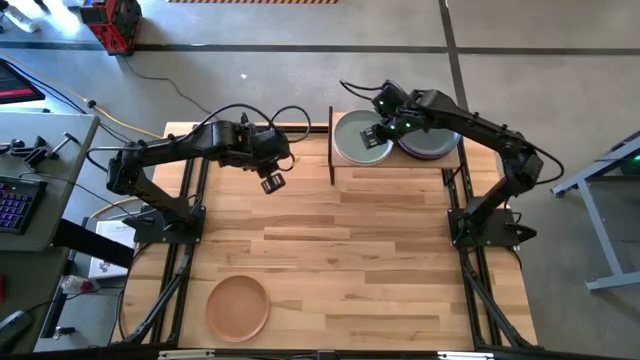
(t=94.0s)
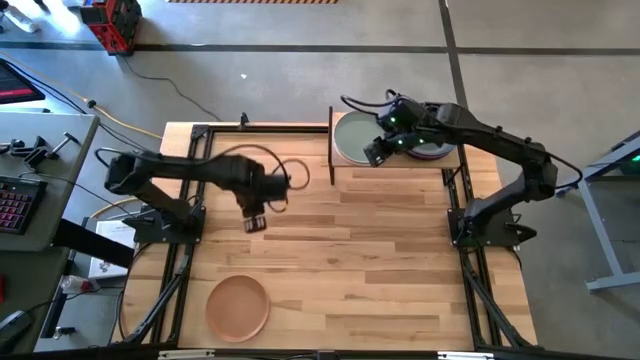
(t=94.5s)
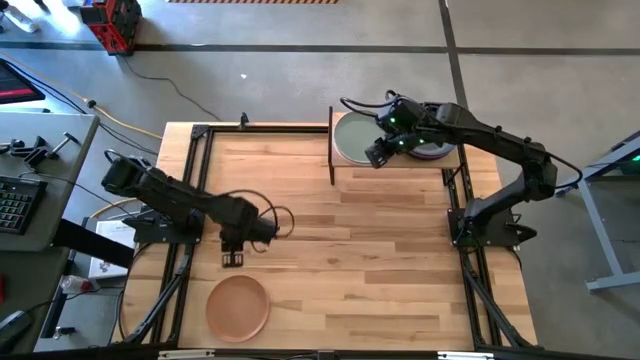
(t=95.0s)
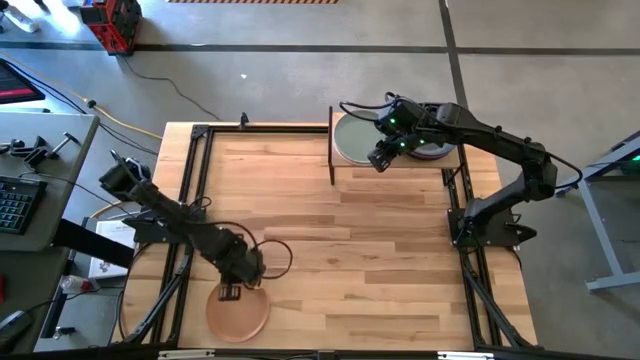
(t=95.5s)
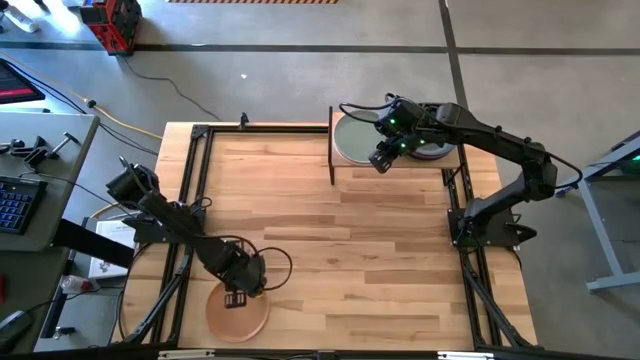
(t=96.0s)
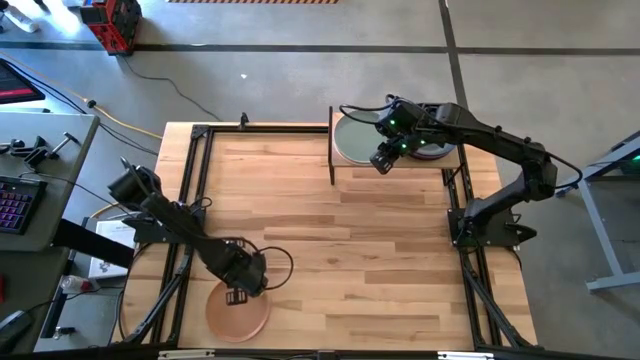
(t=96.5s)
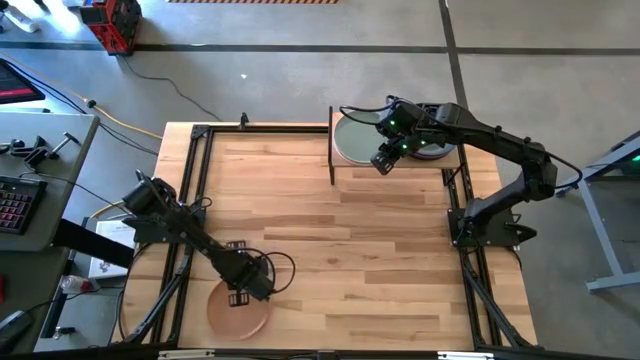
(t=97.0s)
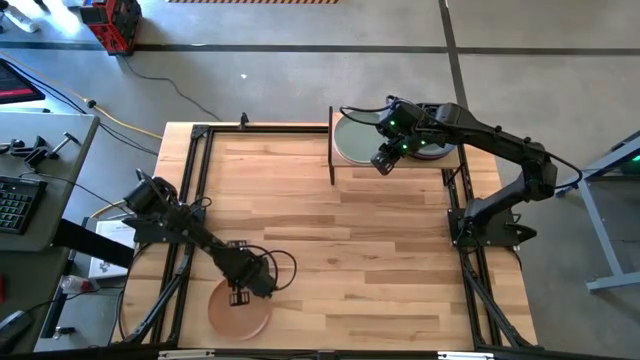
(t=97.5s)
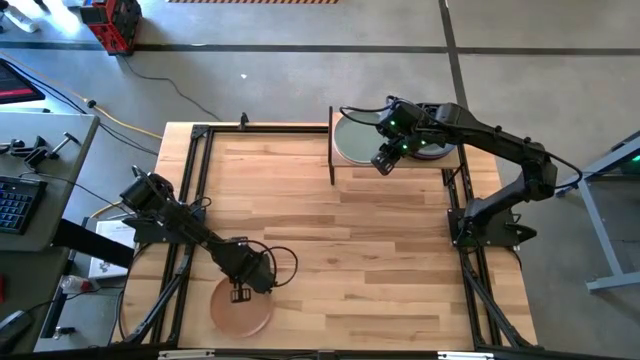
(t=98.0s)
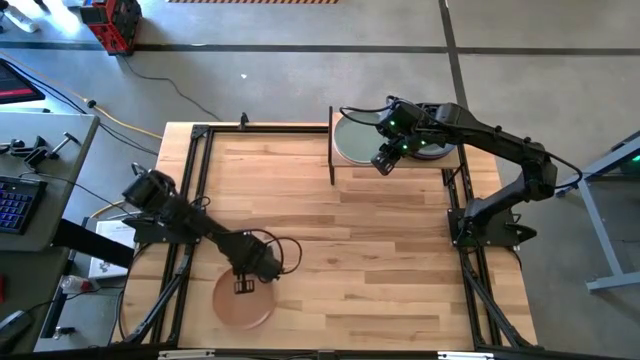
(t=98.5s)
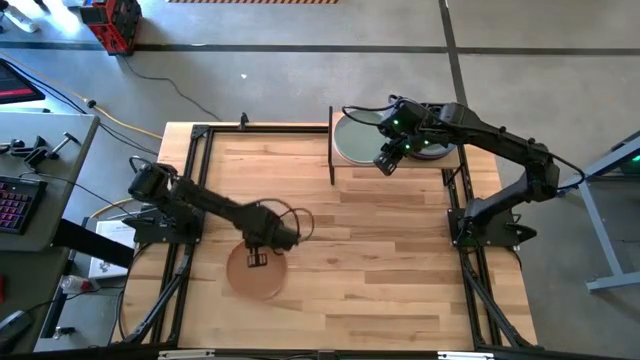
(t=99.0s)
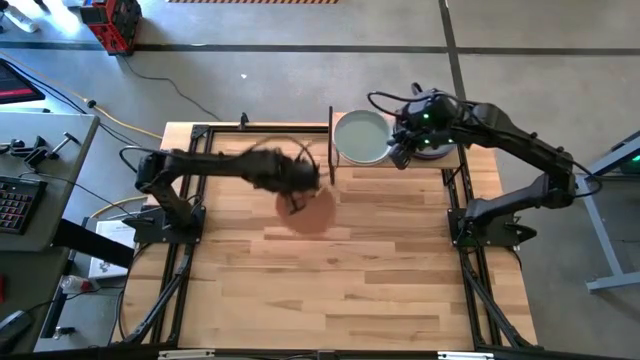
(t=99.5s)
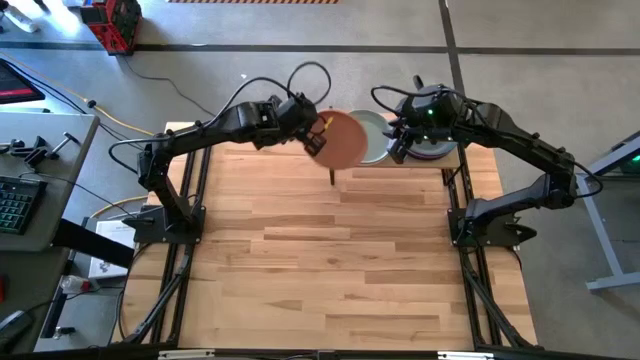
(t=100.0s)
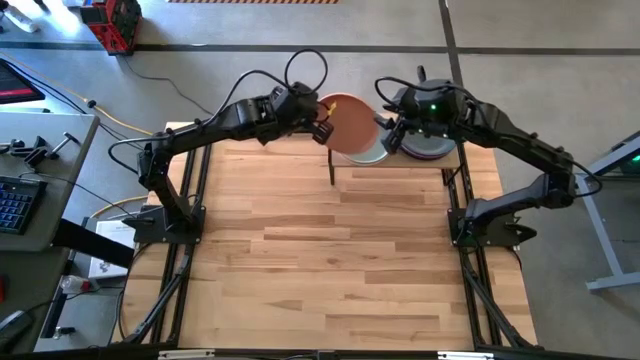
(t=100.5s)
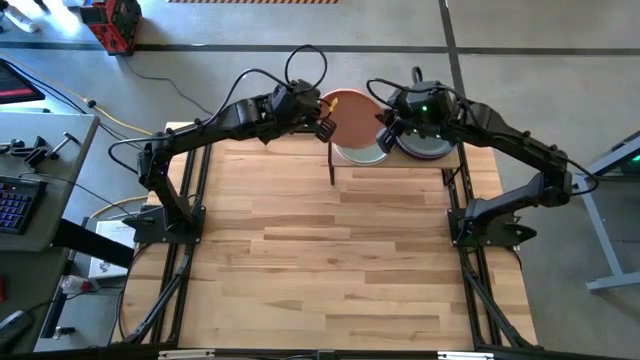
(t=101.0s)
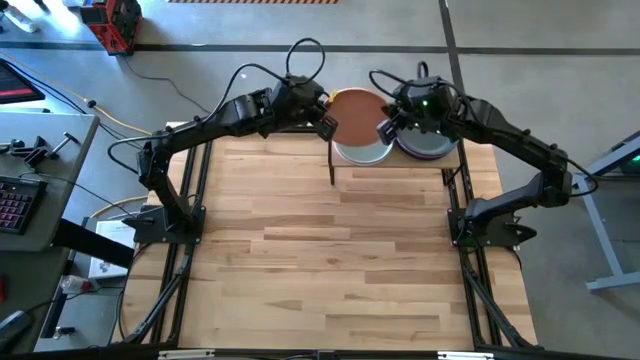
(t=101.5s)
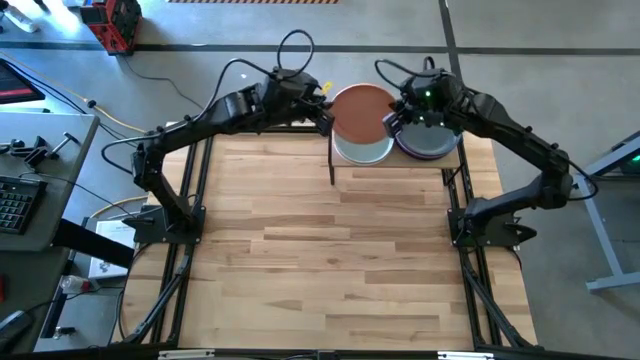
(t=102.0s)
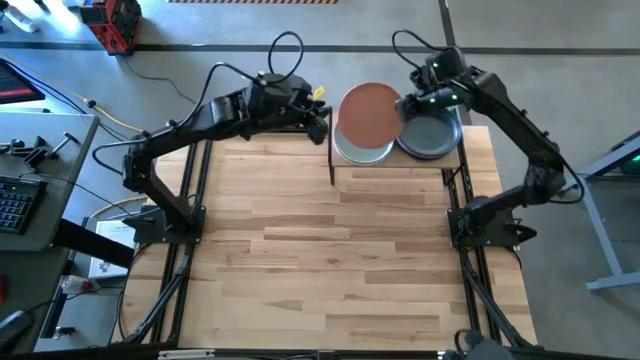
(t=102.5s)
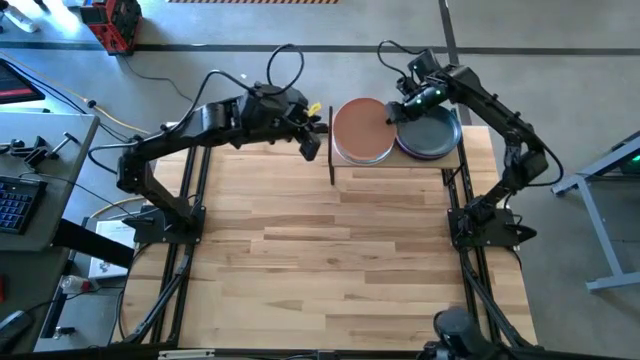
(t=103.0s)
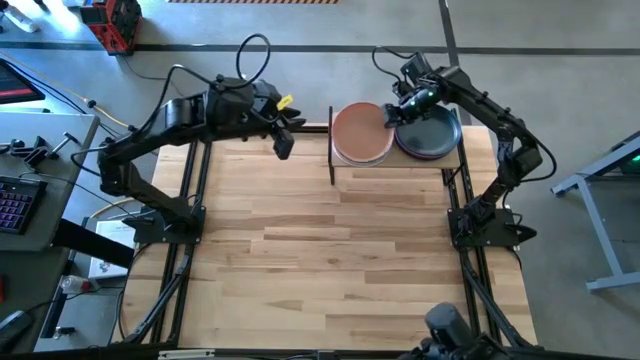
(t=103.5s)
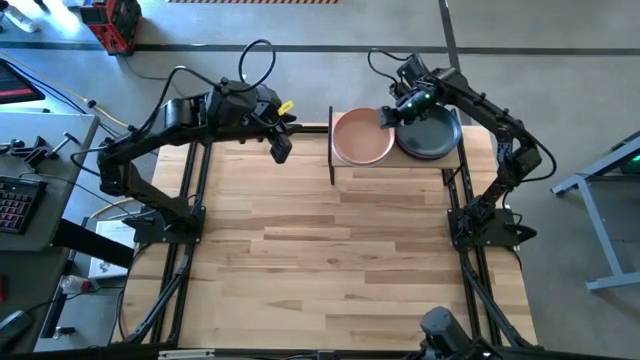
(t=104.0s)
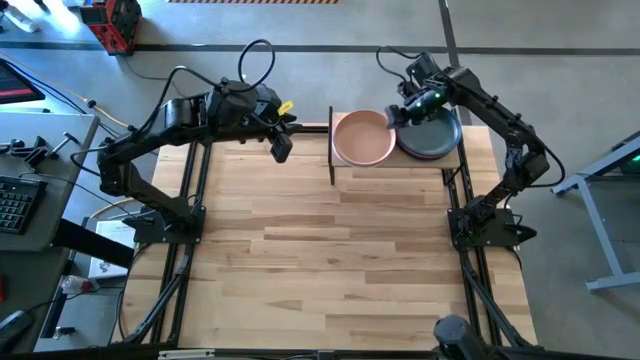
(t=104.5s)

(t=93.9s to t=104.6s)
Task: Place and stack plates onto a shelf
Stack the brown plate on top of the blue plate on the shelf

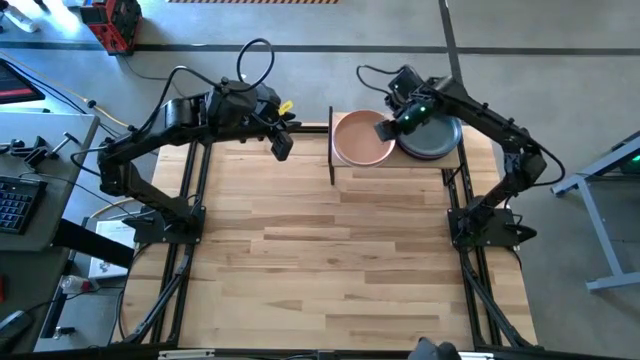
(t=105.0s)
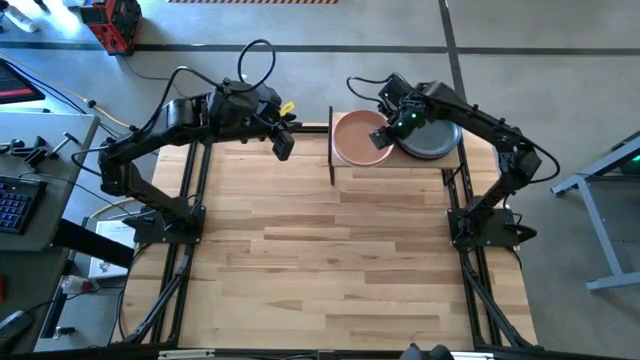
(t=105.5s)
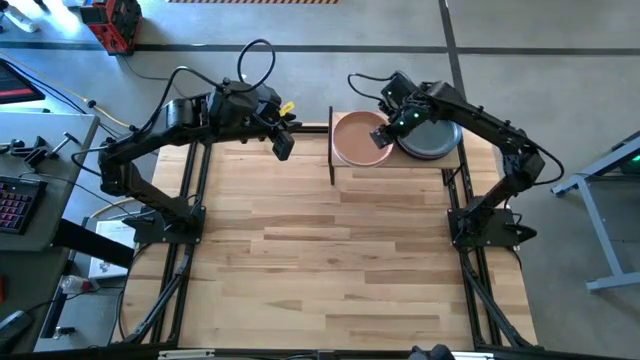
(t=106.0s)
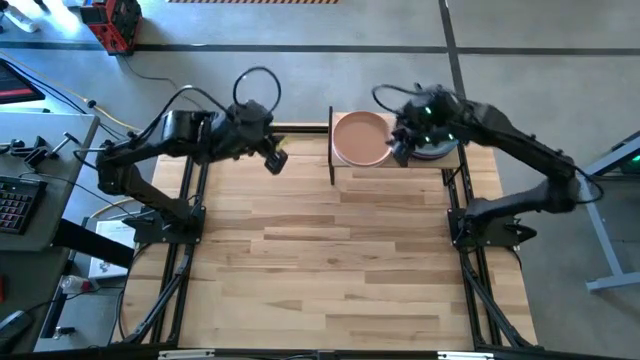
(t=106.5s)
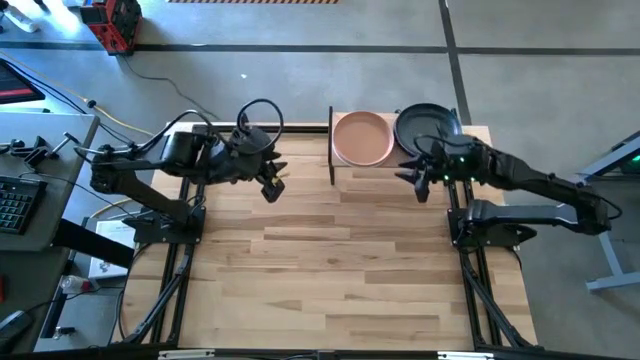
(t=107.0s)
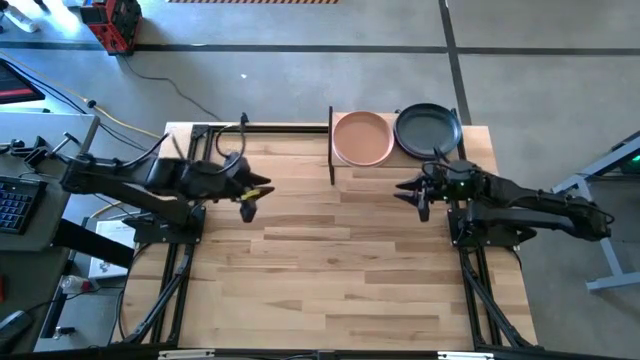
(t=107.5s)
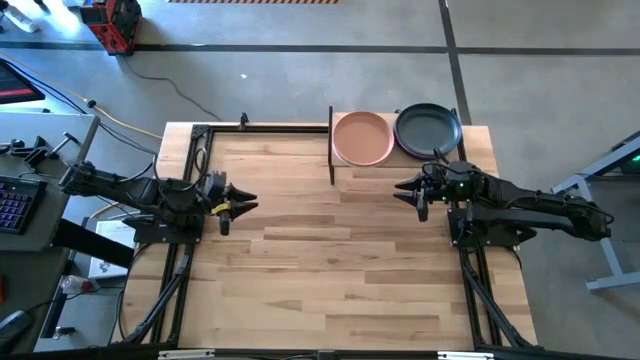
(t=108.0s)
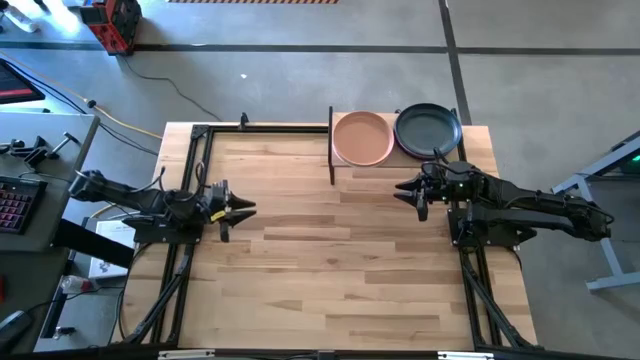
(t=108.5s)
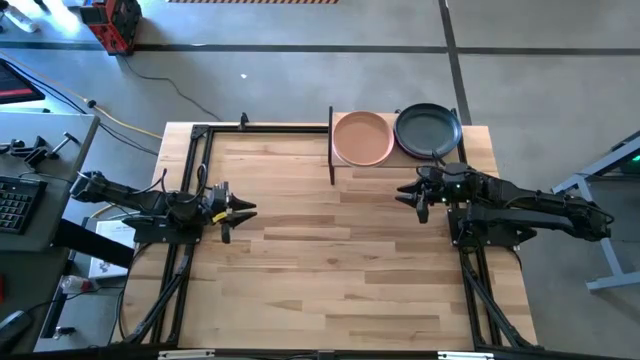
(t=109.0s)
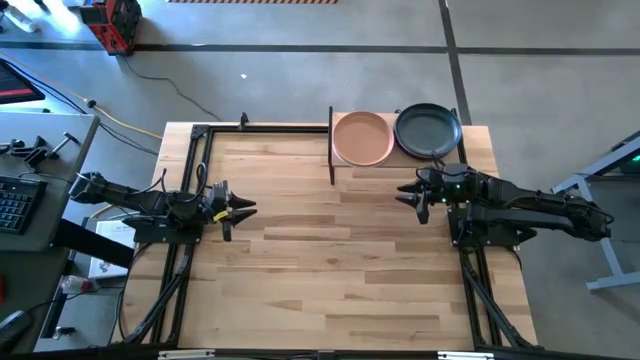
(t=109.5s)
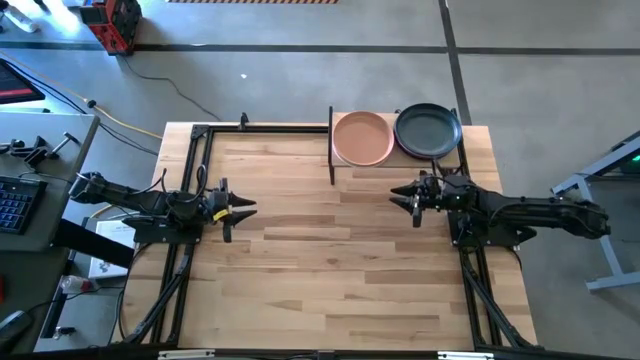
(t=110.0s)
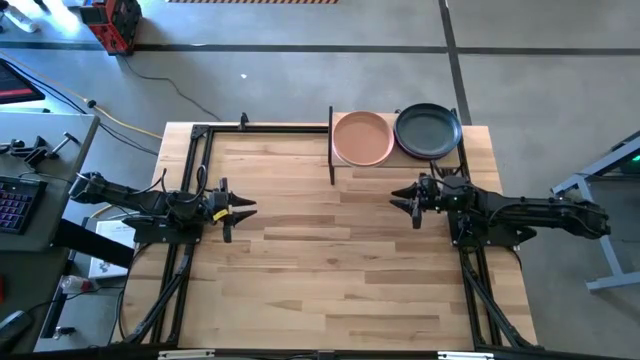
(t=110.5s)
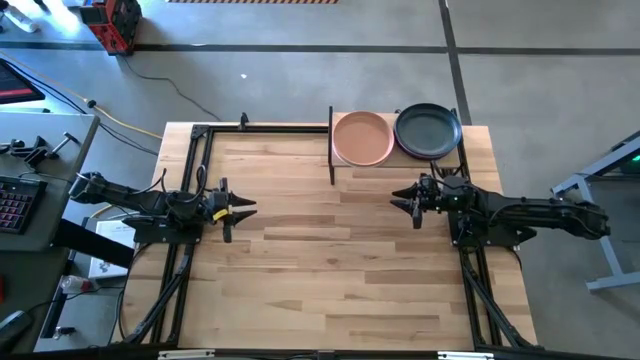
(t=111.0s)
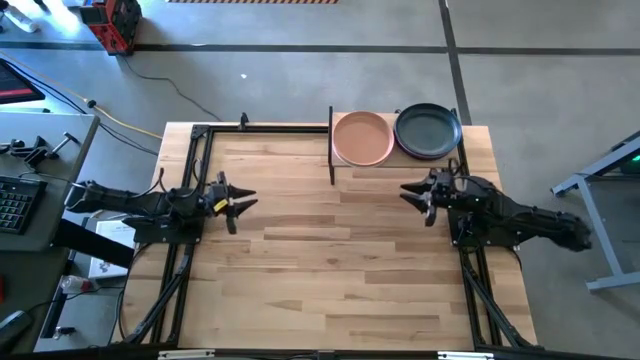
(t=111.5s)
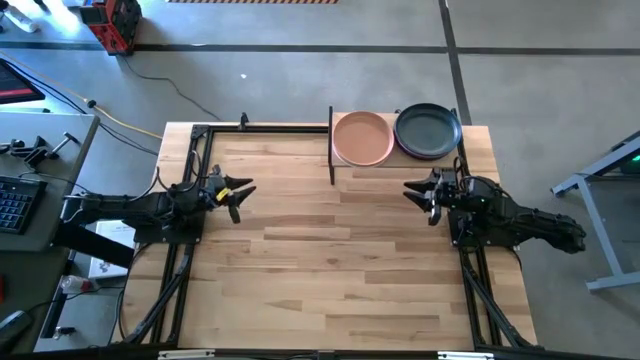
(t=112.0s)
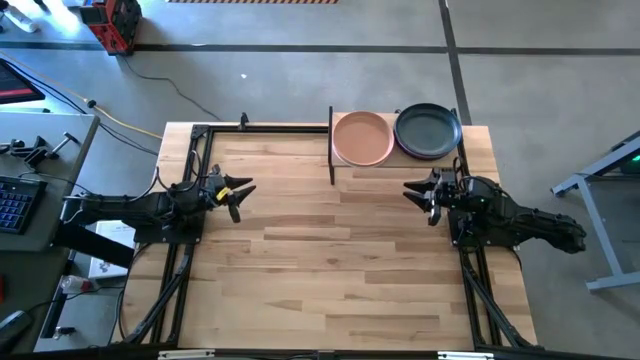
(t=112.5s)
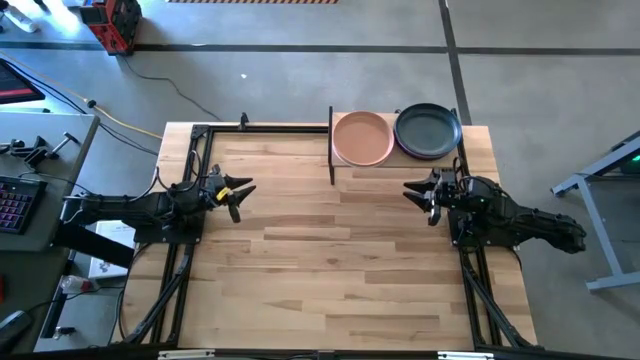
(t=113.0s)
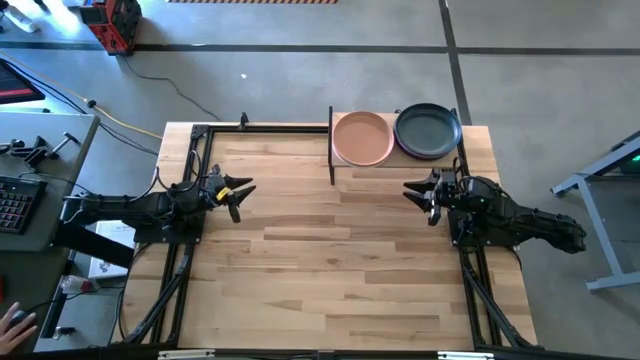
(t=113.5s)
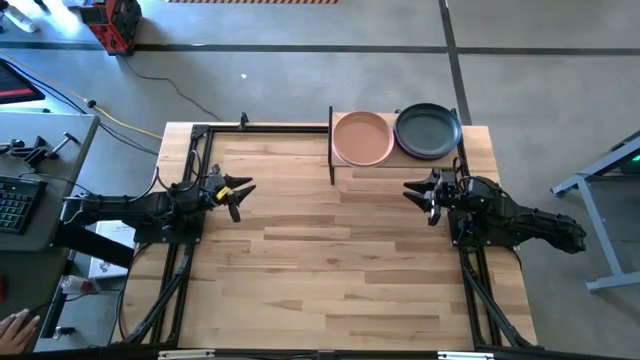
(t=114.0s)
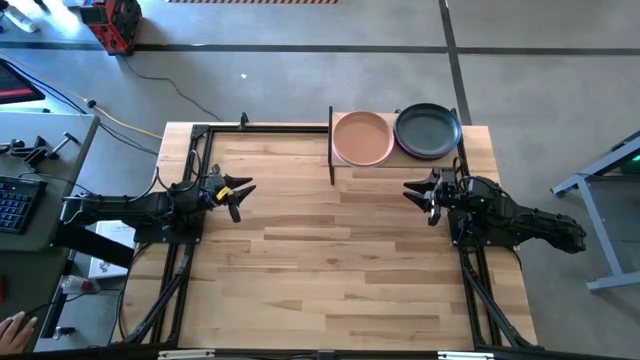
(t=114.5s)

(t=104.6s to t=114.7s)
Return to Home Position

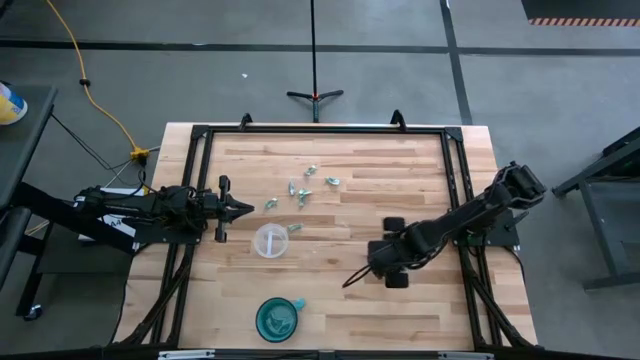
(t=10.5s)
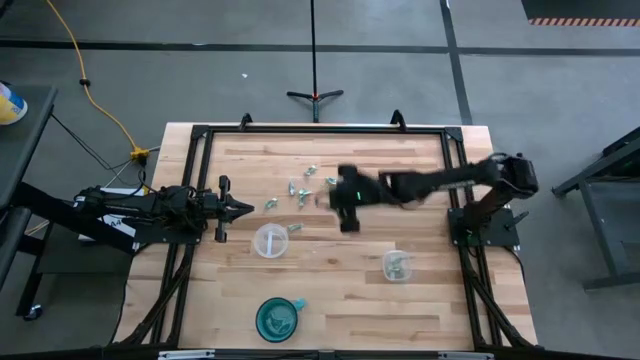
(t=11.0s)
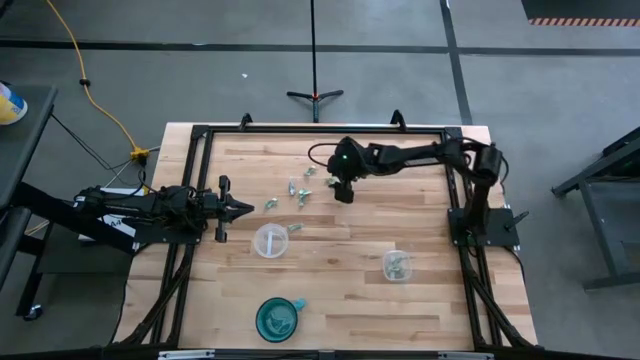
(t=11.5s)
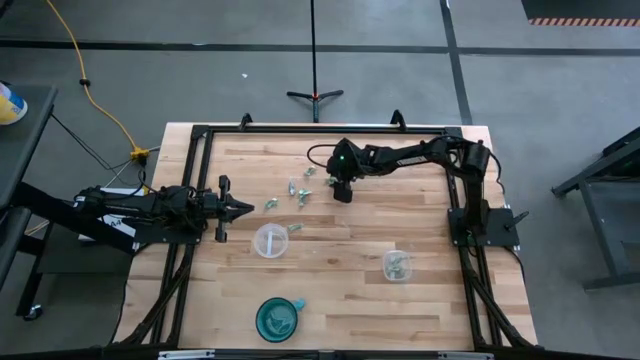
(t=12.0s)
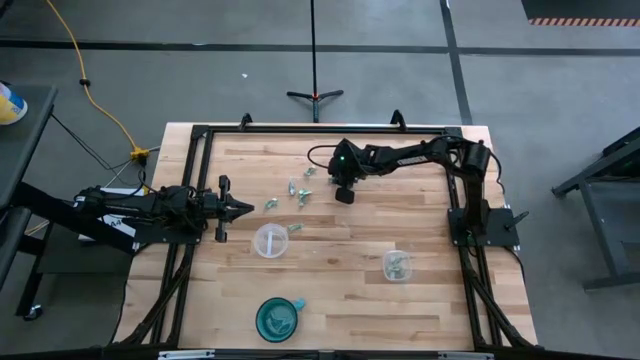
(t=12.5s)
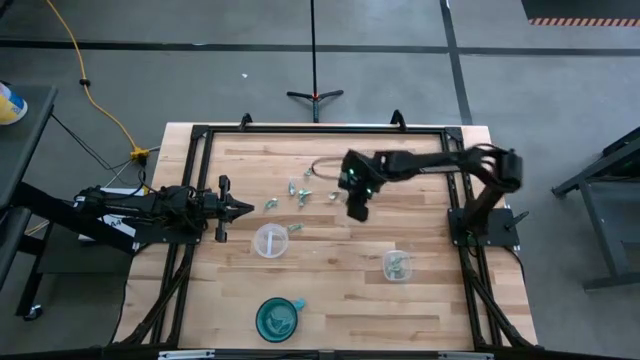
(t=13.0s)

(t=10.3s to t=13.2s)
Task: Sort candy
Put the green candy into the square transparent bin
